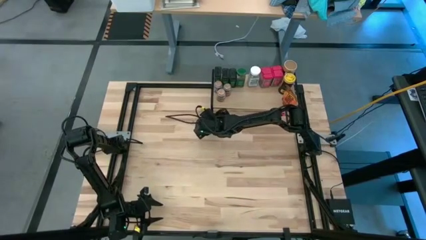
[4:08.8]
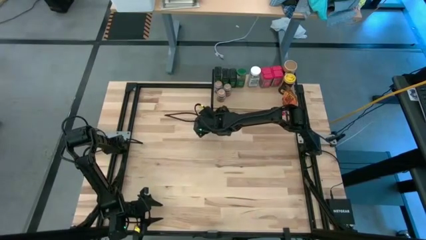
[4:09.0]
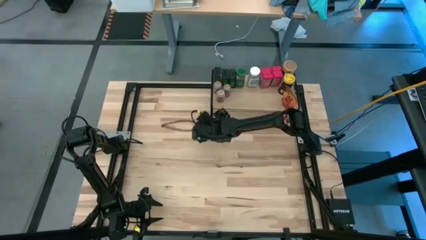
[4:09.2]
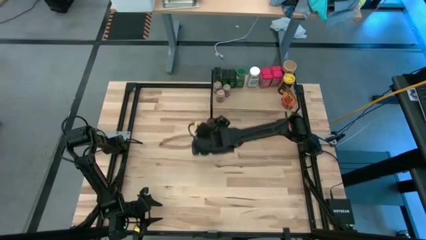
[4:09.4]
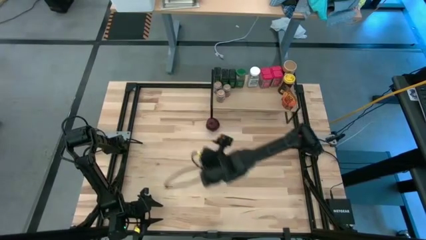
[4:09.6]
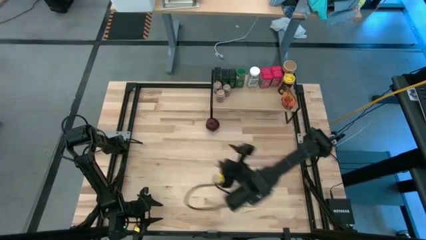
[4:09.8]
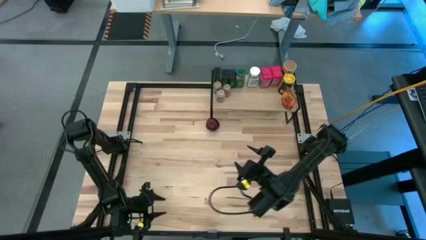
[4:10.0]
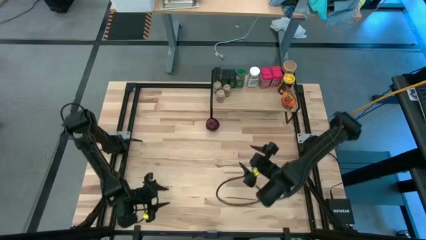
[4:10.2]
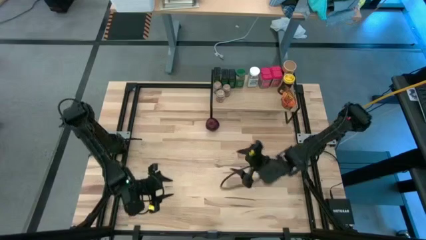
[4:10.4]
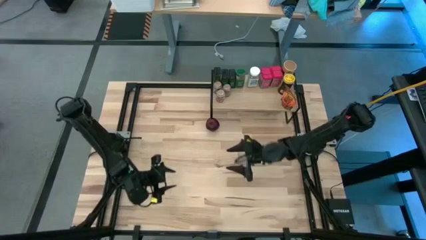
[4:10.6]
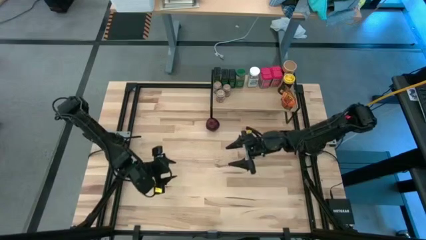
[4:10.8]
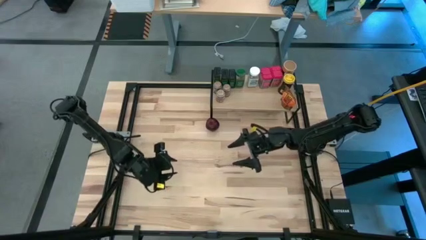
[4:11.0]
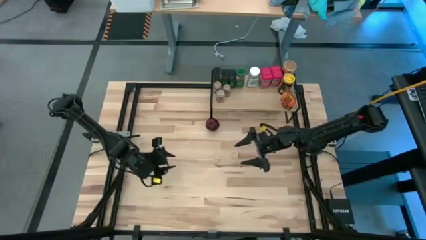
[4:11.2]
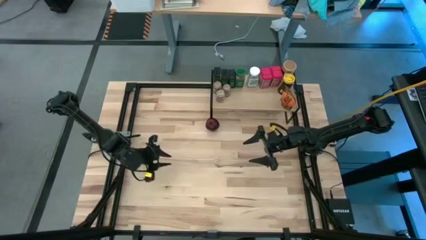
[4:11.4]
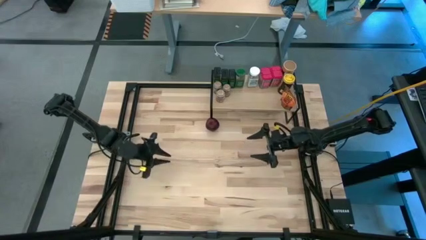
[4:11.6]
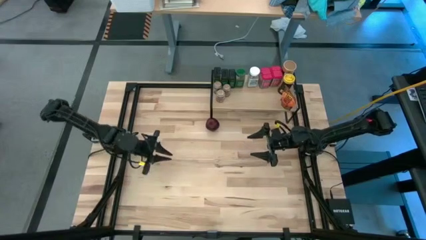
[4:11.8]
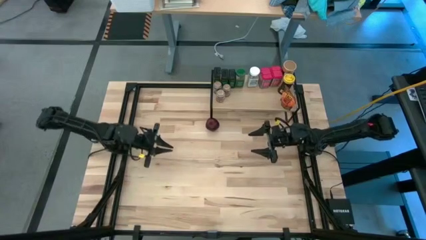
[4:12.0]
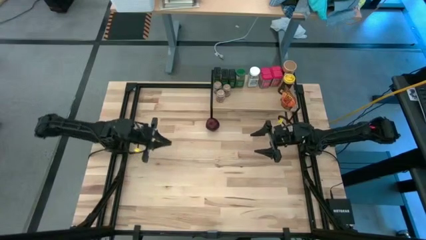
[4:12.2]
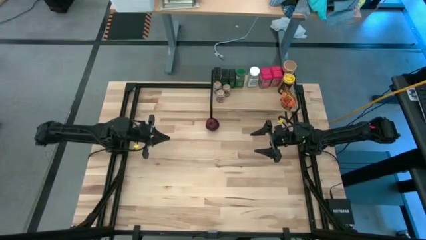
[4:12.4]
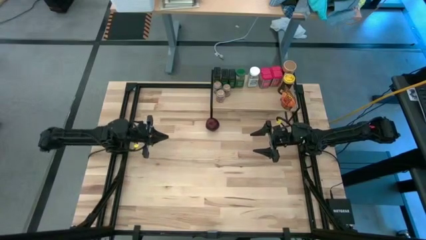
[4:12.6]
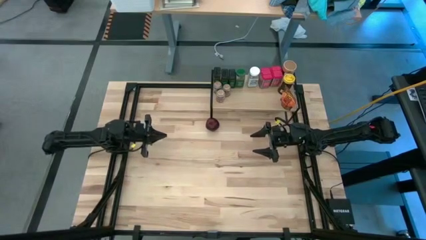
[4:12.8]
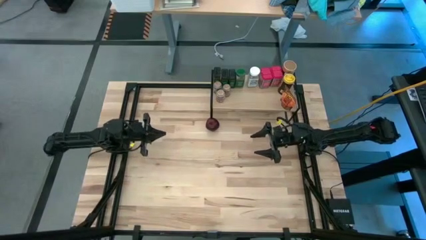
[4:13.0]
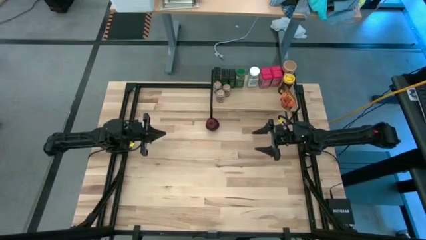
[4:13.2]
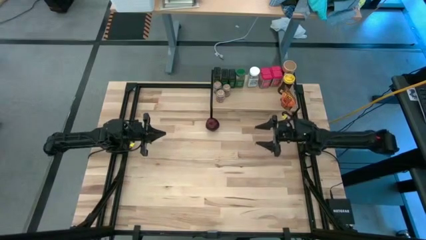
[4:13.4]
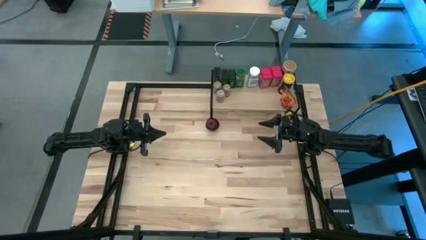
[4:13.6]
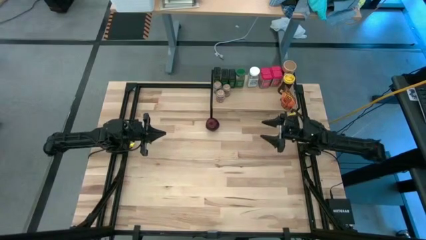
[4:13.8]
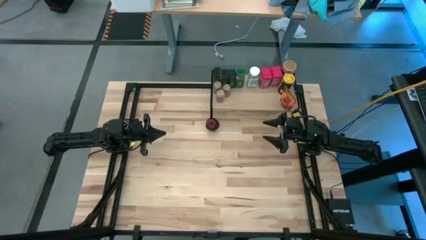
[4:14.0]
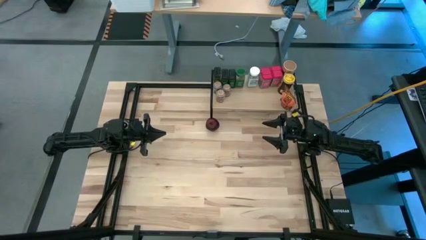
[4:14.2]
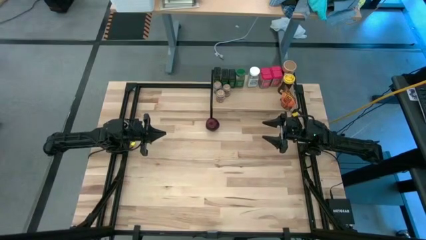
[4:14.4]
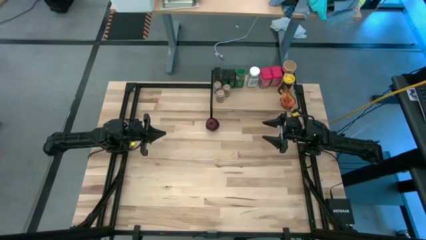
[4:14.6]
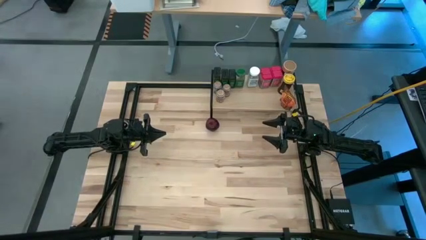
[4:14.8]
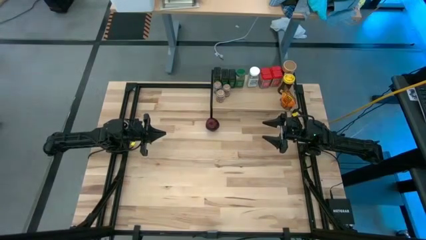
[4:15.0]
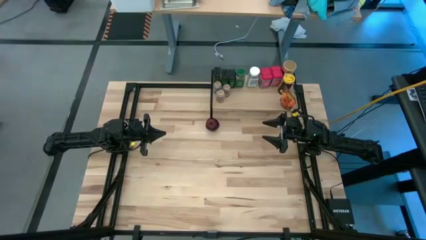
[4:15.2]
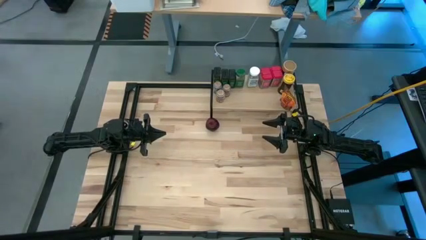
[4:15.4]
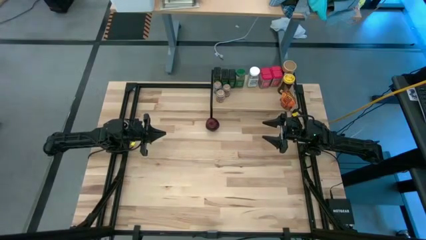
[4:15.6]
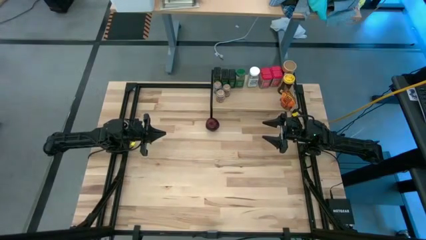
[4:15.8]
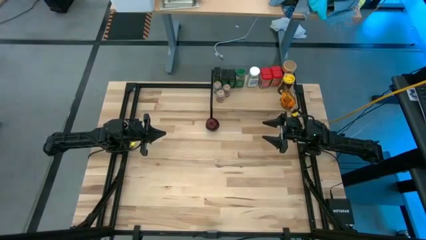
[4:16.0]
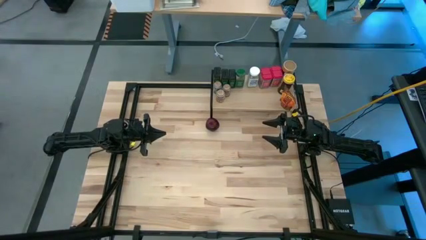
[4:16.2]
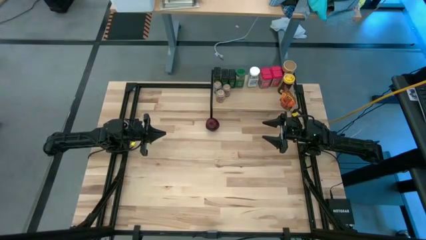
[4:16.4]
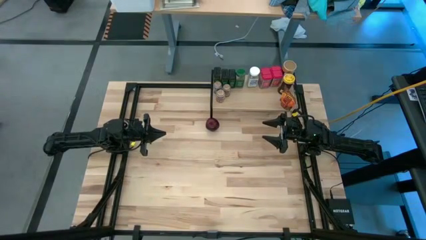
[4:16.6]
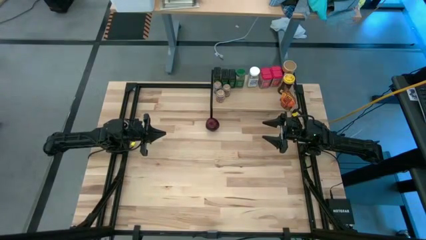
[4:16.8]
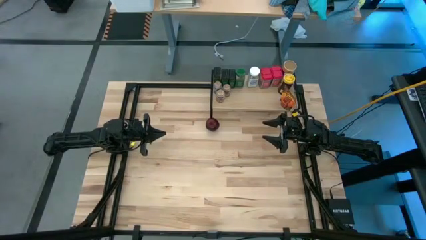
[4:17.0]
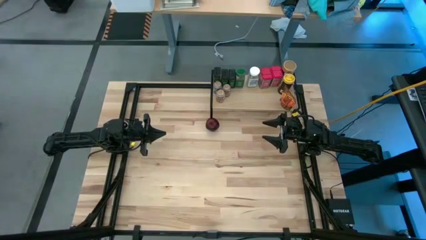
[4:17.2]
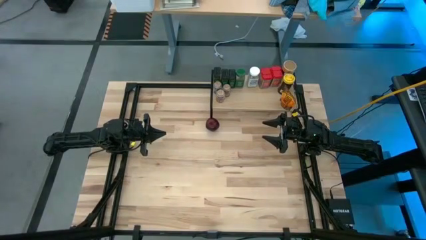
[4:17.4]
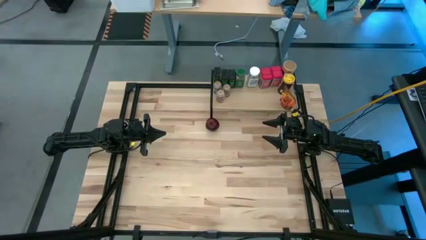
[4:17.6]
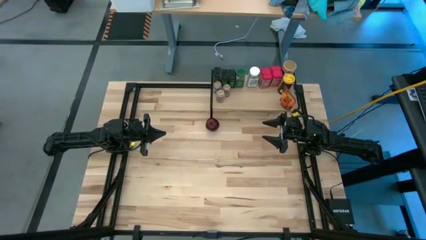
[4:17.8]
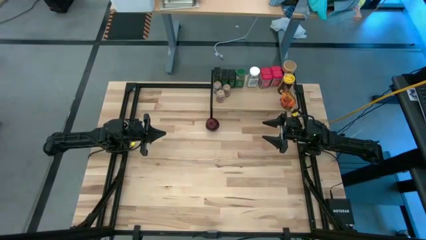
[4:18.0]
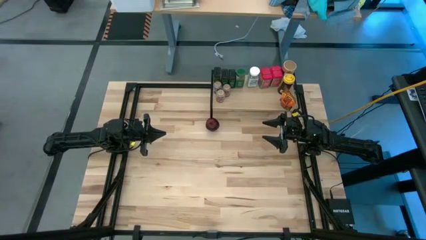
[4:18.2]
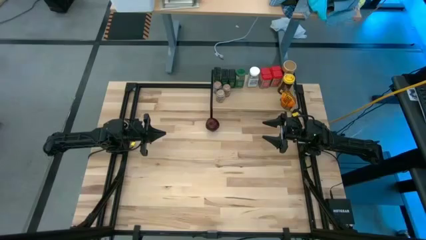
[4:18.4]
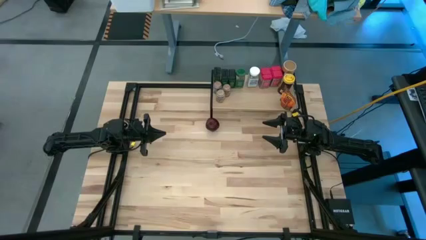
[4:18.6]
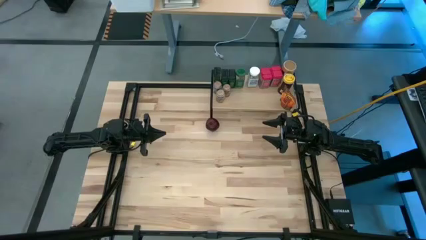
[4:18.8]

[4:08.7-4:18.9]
Task: Shelf spices
Return to Home Position

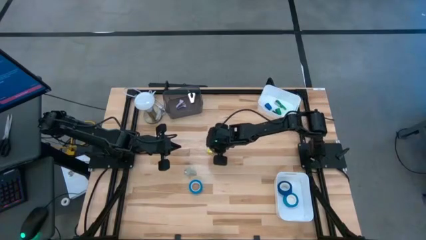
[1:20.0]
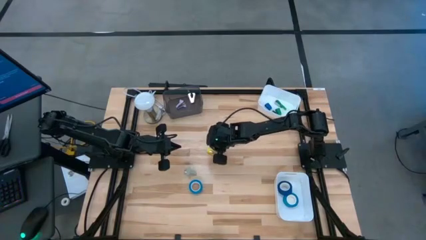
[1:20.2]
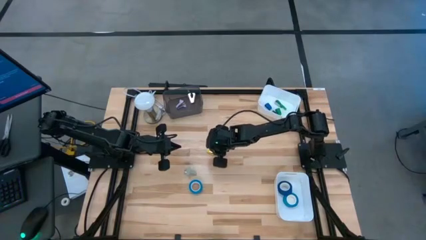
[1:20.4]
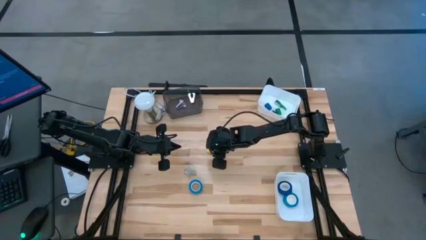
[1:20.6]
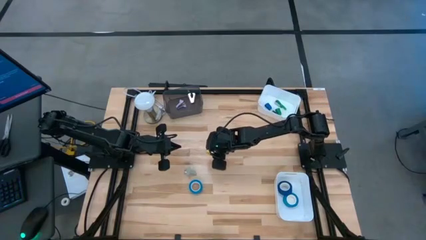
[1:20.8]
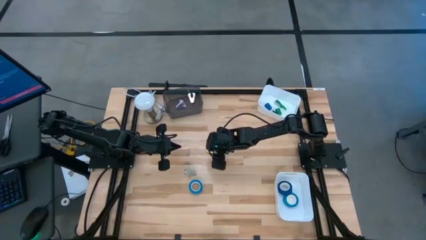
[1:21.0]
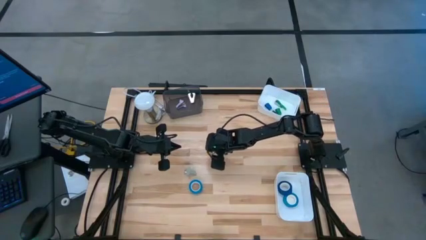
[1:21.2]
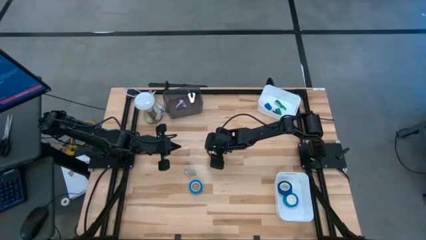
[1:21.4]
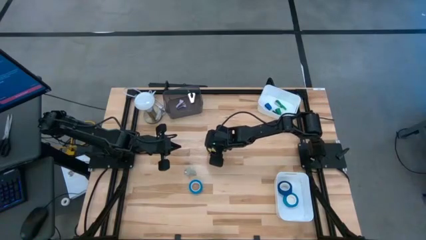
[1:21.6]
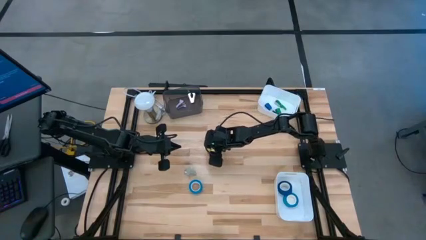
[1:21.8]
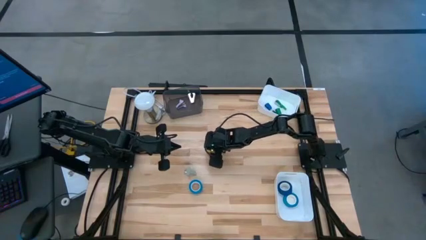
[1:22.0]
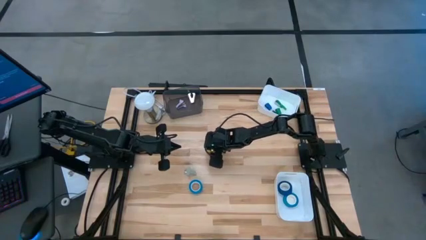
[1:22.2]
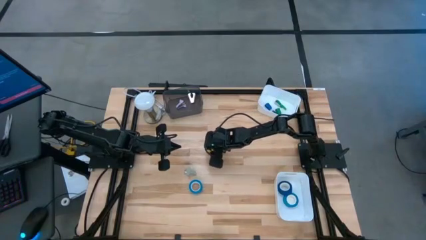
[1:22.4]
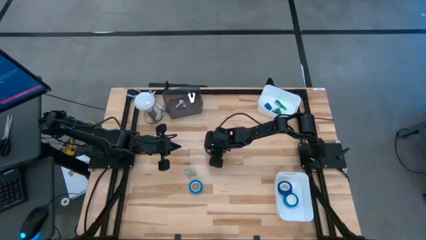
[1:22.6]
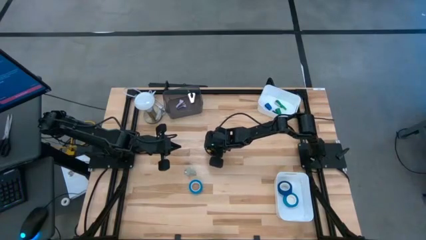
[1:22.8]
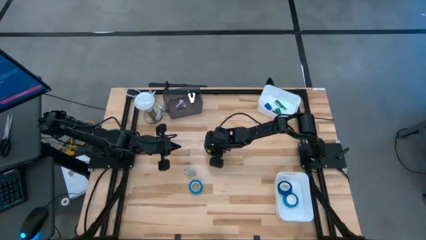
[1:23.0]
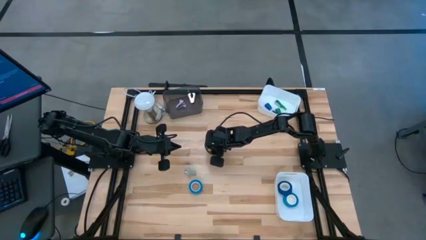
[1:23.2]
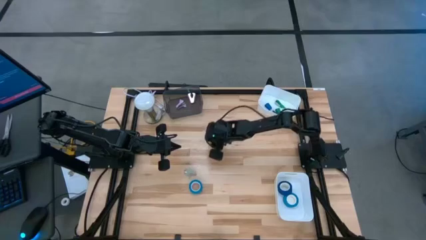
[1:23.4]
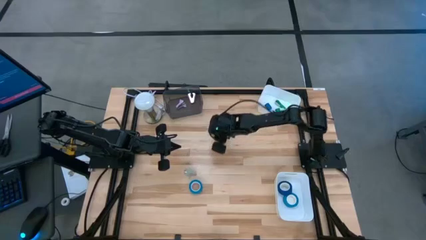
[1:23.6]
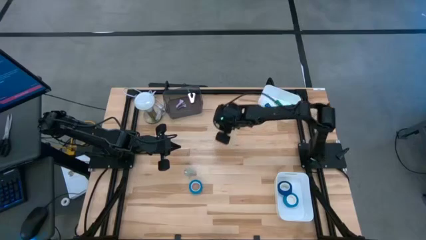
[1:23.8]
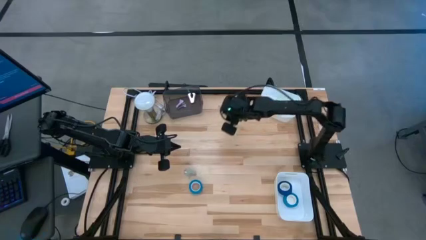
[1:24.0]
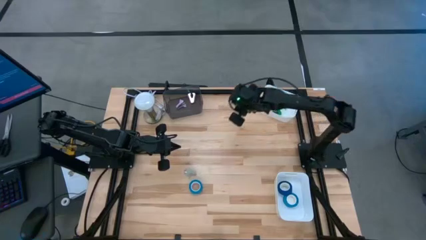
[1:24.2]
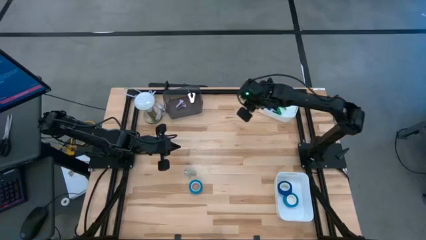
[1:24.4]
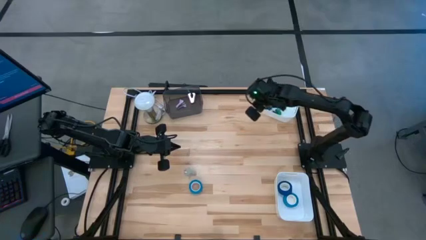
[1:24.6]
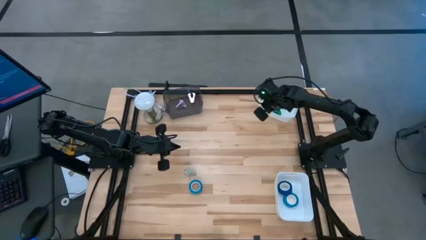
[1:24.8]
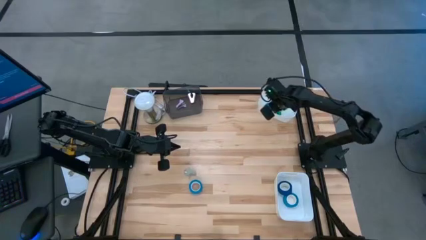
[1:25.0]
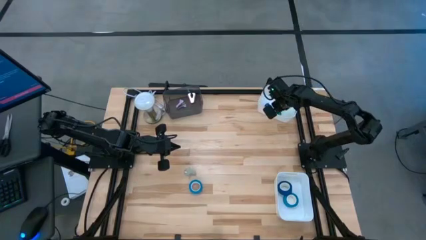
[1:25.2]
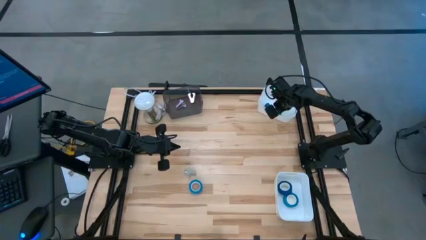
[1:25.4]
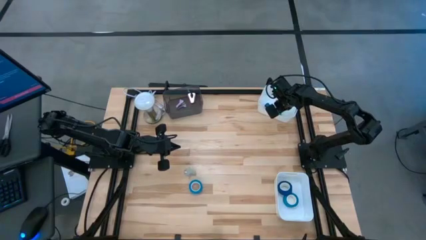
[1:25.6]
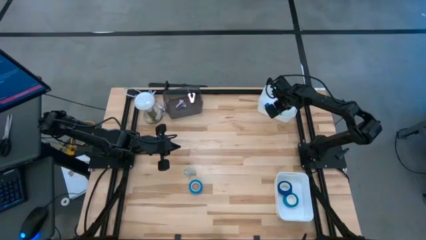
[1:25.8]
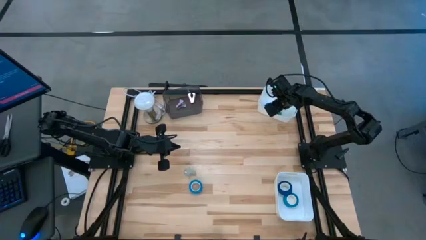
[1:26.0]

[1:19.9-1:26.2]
Task: Pick and place Stapler, Stapler remover, tape
Put the yellow stapler into the top white bin
